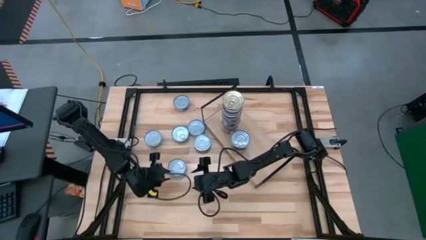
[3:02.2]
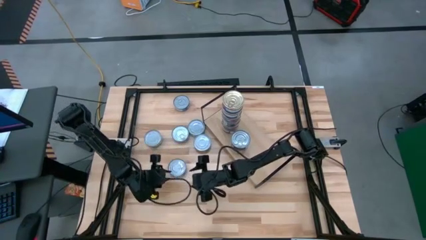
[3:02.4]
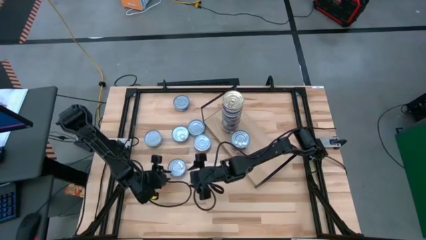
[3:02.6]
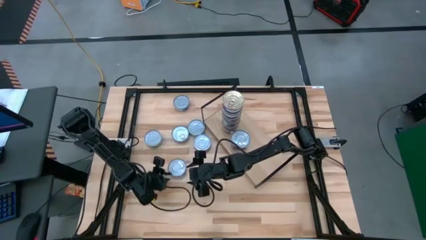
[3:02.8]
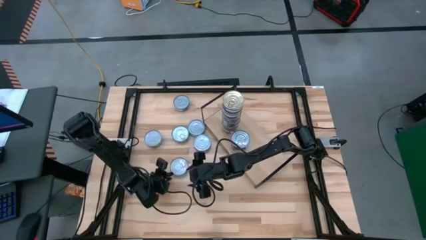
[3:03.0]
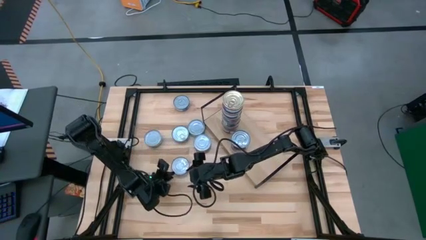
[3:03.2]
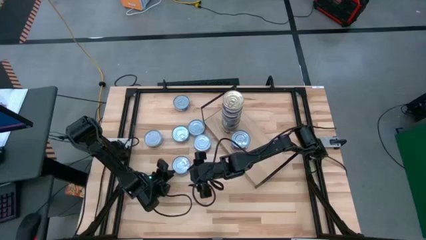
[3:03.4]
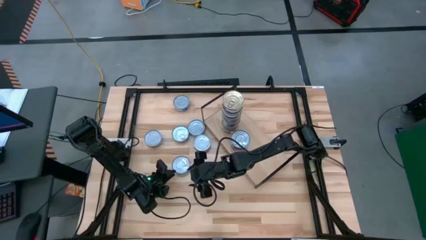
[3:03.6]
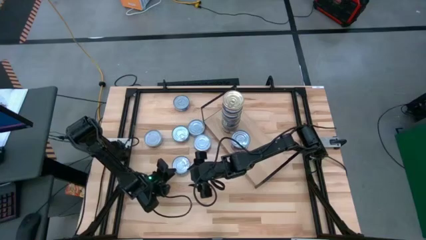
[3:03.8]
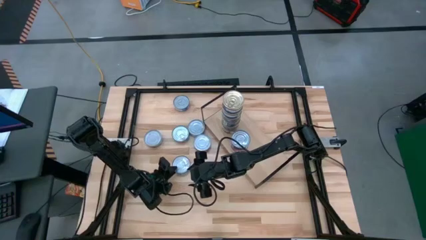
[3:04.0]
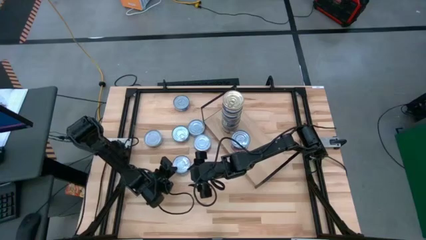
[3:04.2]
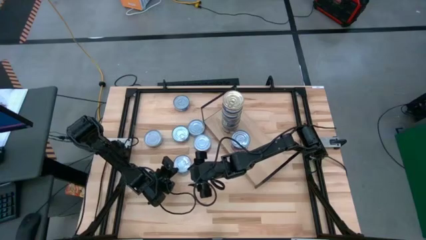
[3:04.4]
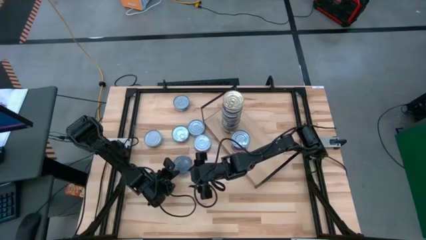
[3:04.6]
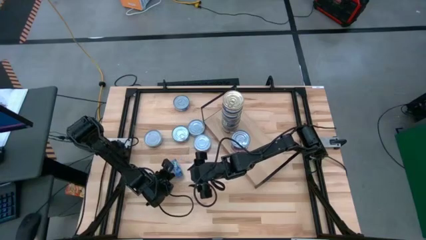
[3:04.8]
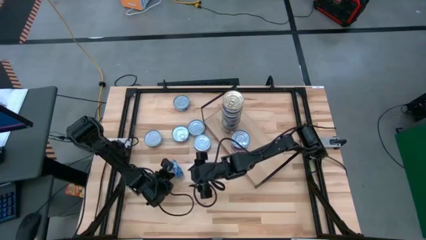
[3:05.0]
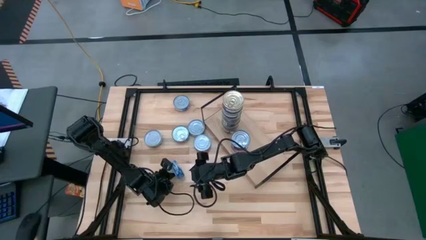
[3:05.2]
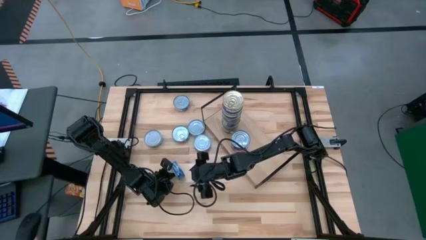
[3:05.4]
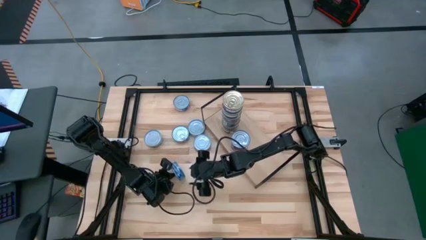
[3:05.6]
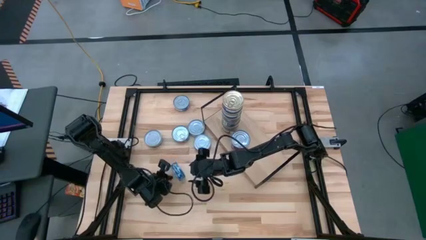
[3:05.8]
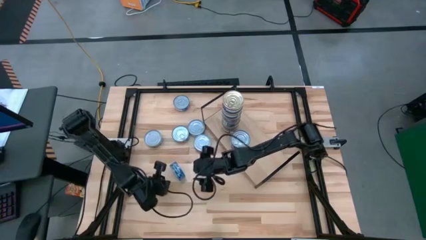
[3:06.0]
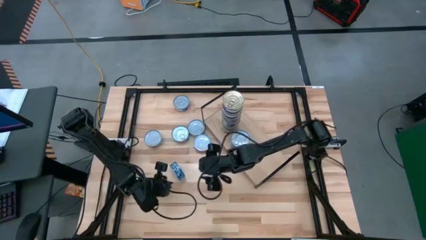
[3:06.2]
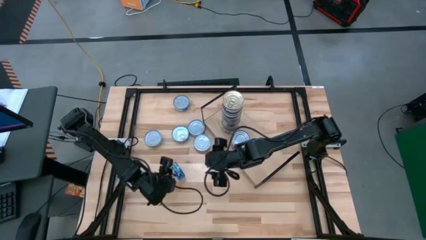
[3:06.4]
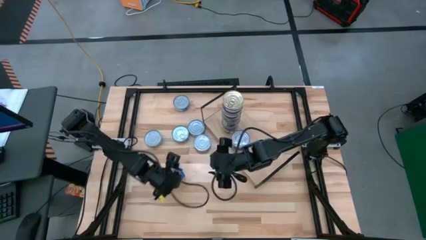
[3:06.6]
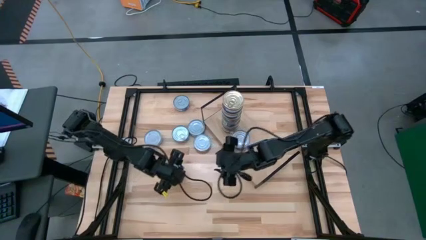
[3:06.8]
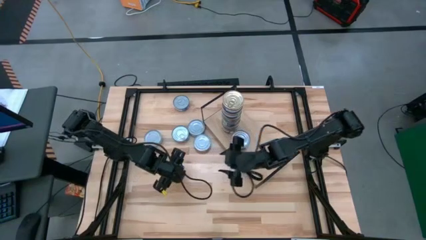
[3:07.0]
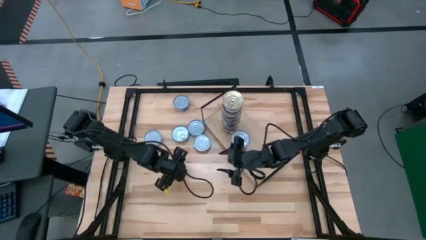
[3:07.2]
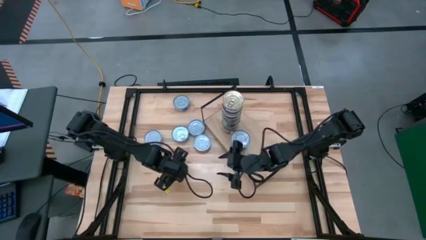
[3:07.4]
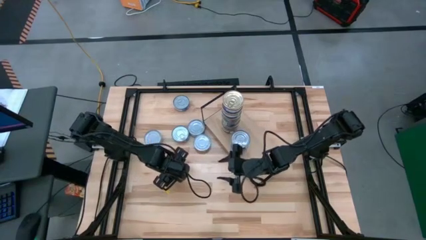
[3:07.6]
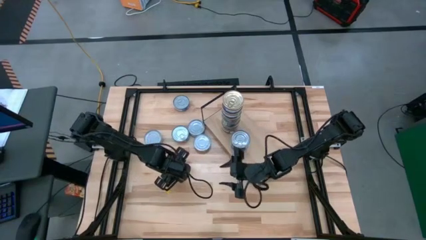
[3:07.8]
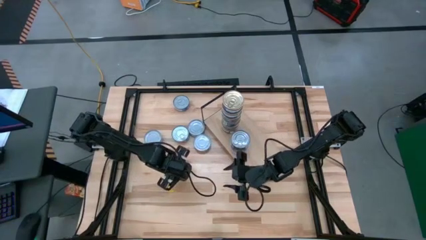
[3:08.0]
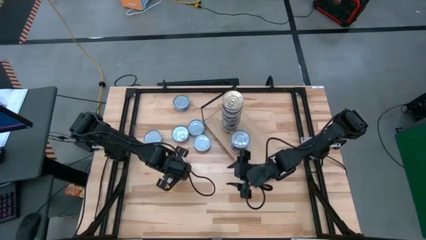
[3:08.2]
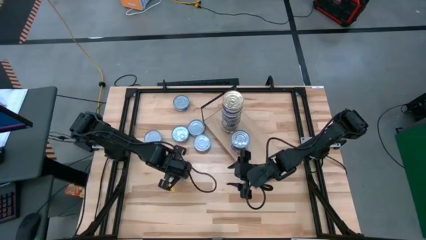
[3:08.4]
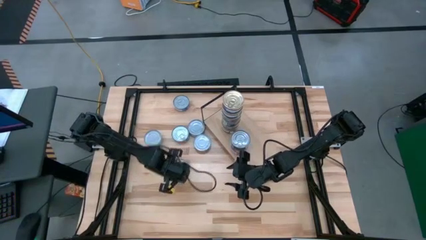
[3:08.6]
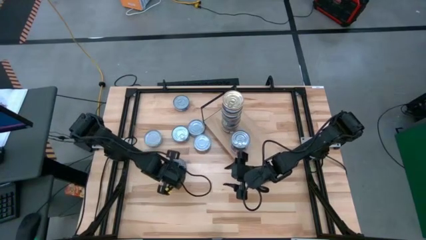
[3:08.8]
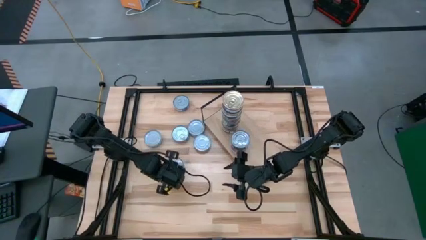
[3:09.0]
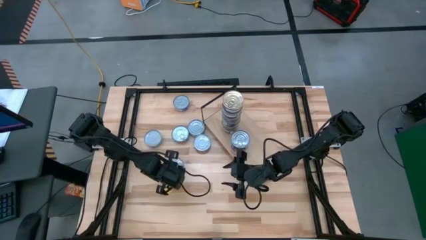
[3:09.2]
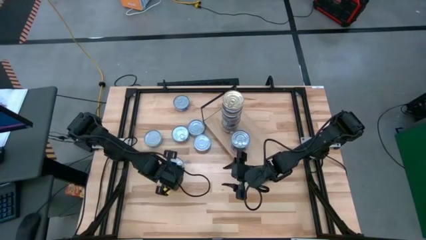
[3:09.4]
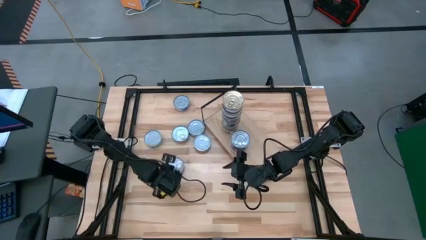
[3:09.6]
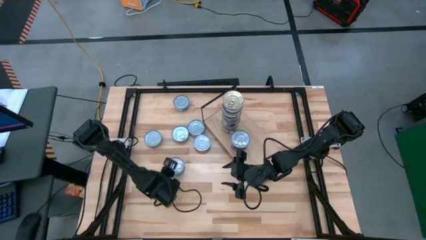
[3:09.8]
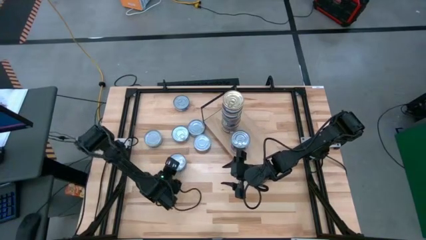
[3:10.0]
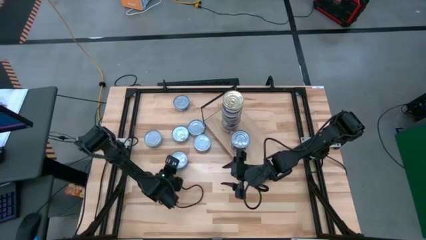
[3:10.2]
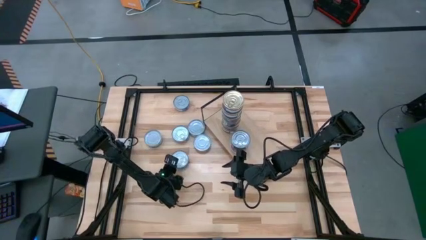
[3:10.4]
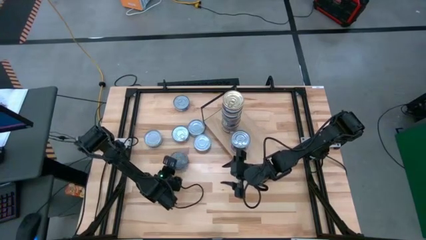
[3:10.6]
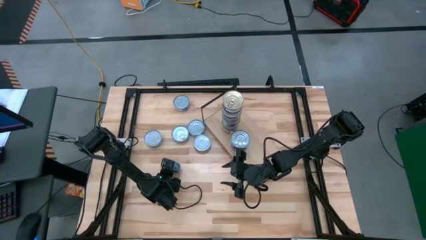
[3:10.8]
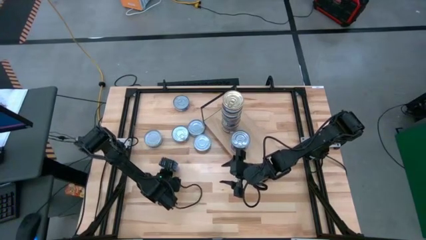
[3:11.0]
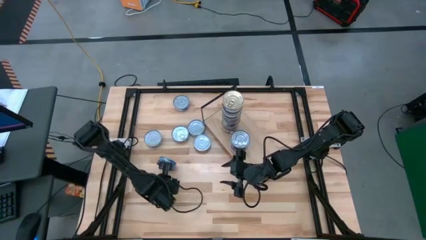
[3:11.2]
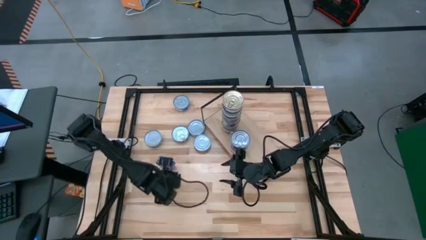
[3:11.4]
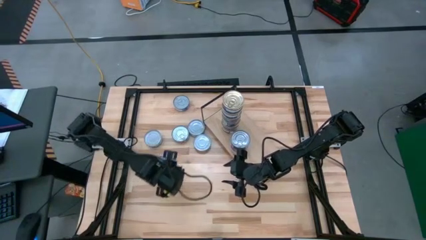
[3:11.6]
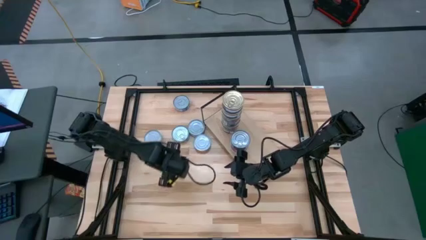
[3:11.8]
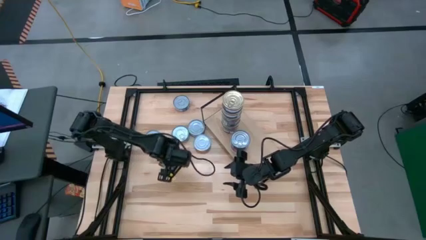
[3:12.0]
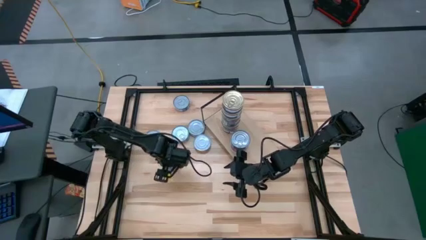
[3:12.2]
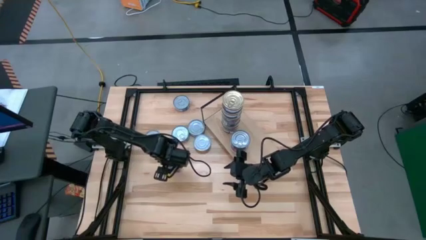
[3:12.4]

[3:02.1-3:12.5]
Task: Stack canned seafood by type on shelf
Stack the blue tuna can on top of the blue tuna can on the shelf

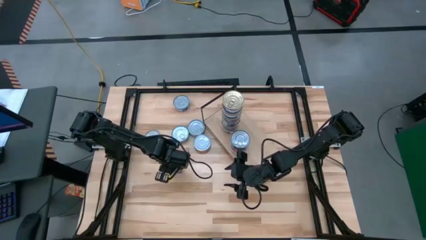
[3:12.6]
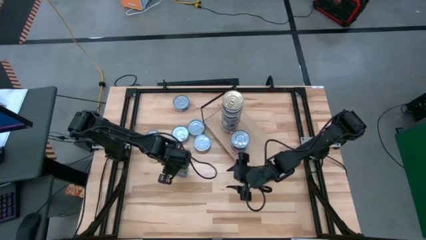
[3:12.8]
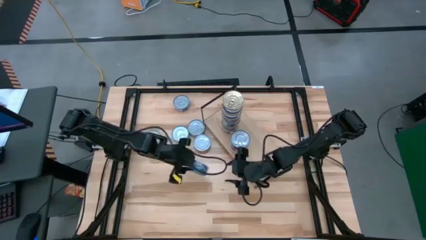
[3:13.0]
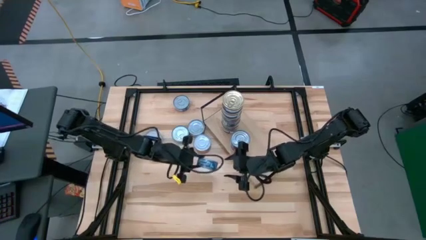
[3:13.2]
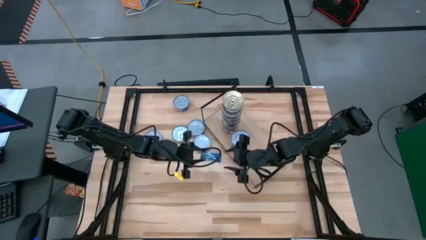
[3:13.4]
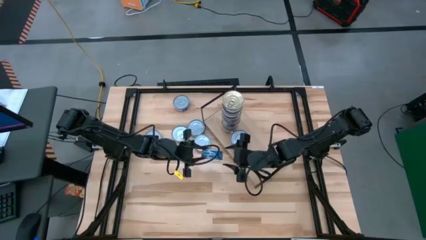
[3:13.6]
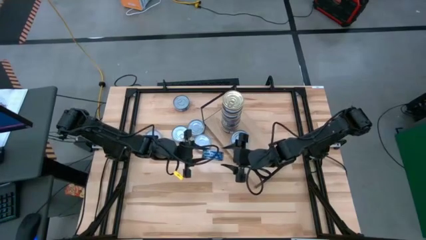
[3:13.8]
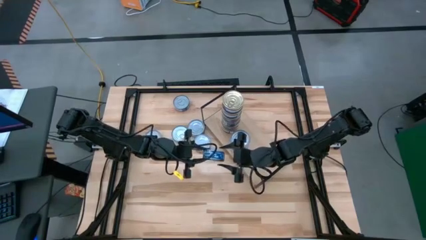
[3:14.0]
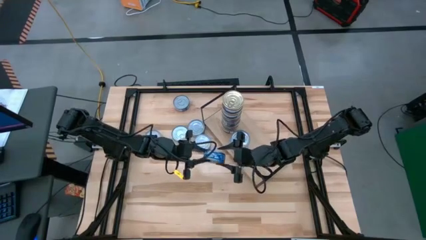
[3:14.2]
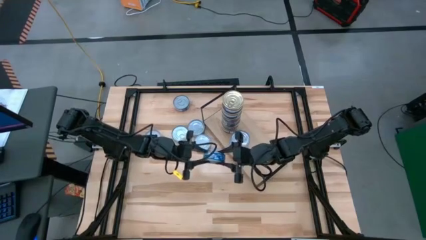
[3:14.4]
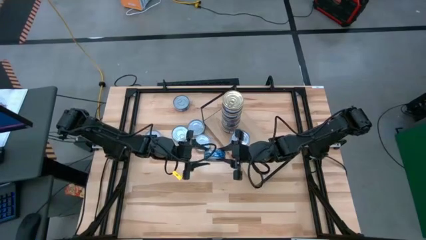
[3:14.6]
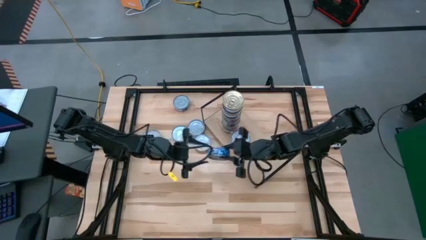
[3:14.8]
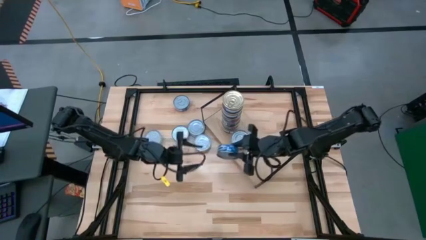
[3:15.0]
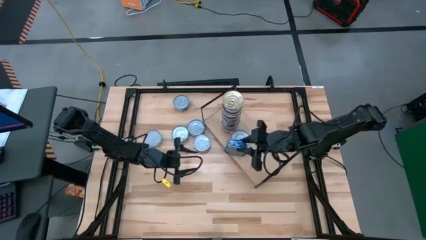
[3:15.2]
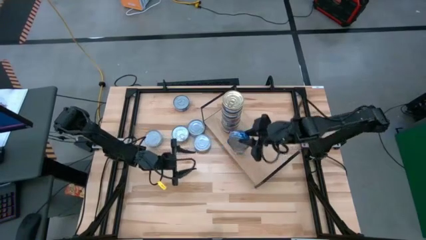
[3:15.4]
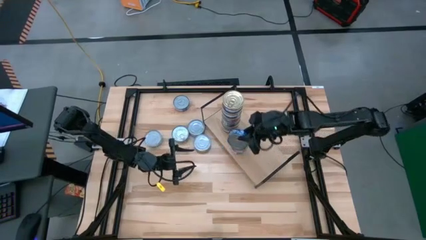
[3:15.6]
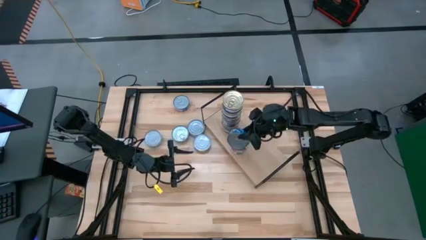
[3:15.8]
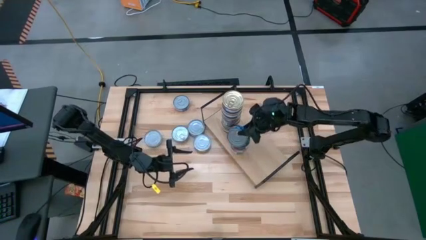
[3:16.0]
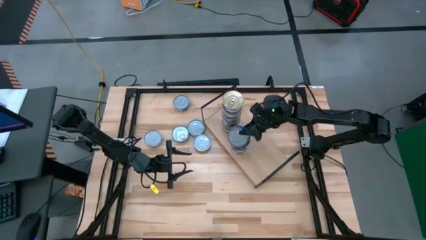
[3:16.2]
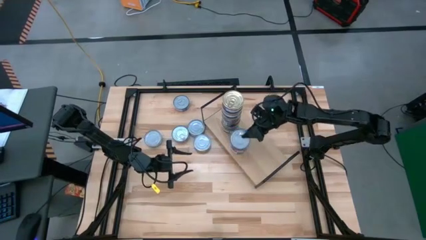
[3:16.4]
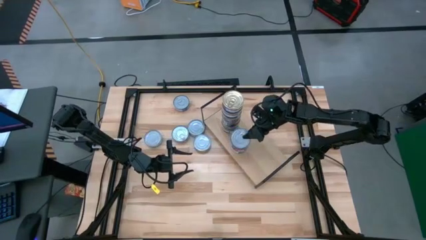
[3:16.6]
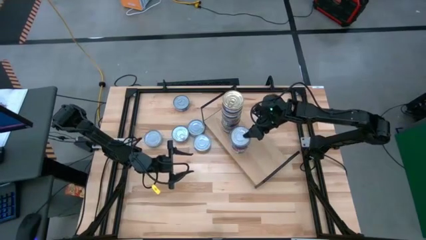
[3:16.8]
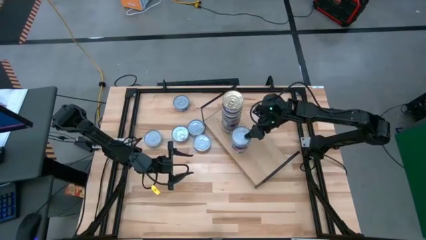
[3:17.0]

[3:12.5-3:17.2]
Stack the blue tuna can on top of the blue tuna can on the shelf
